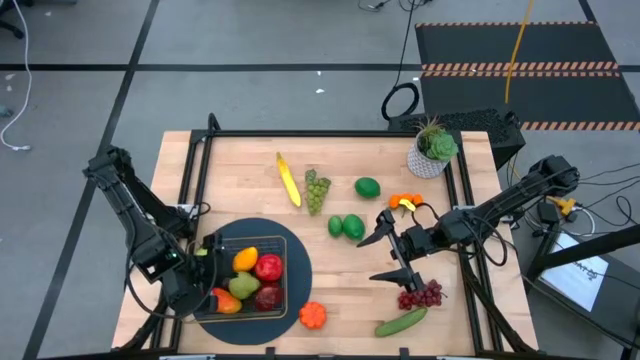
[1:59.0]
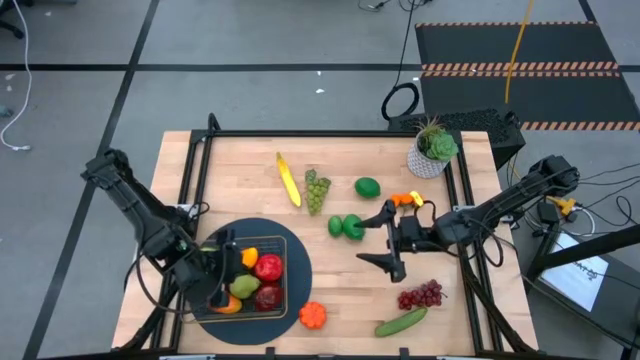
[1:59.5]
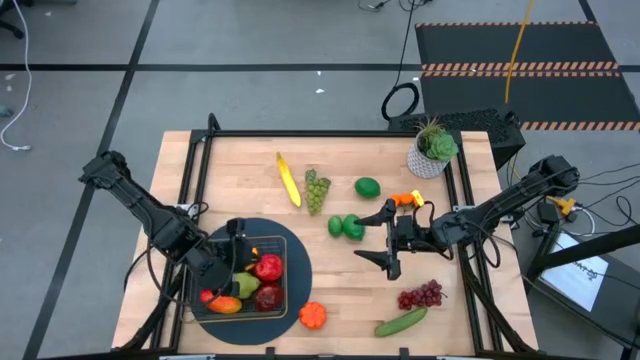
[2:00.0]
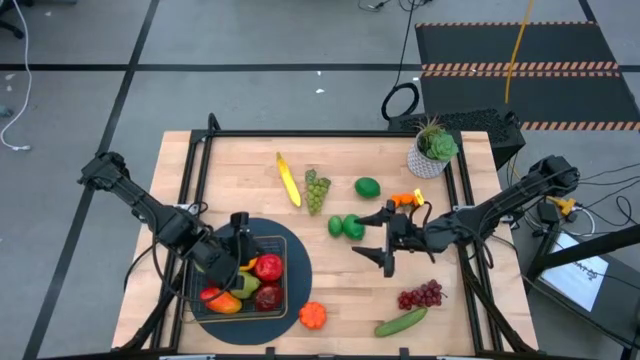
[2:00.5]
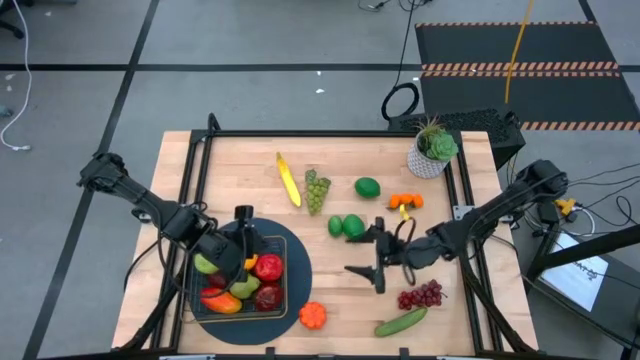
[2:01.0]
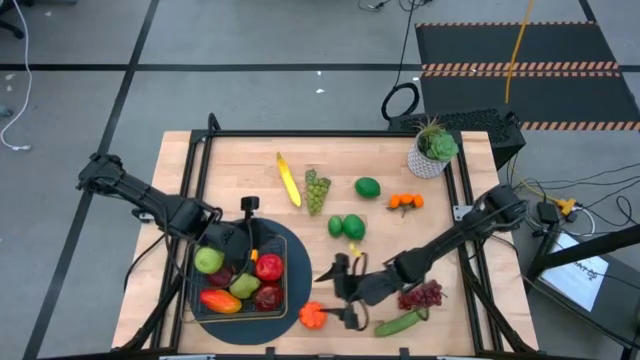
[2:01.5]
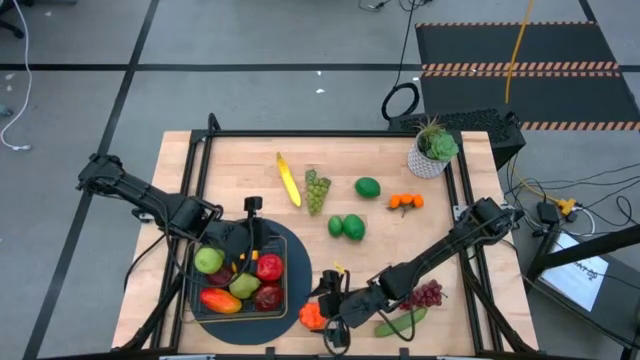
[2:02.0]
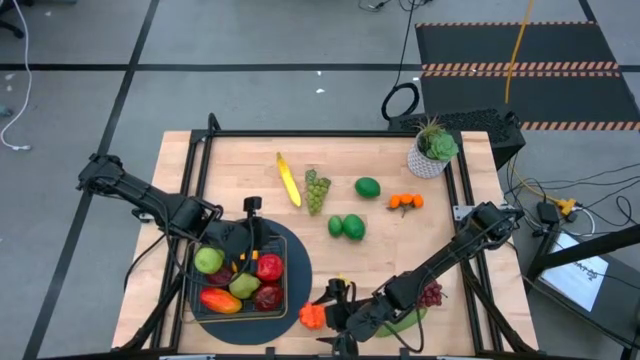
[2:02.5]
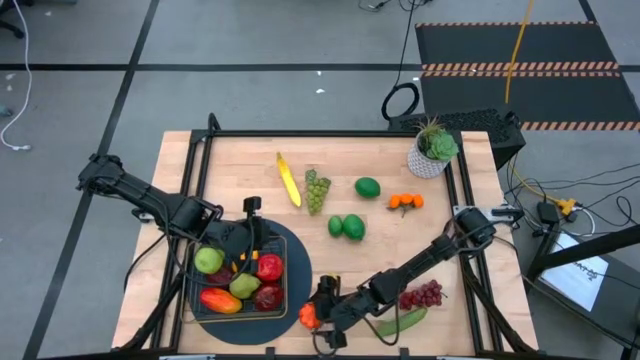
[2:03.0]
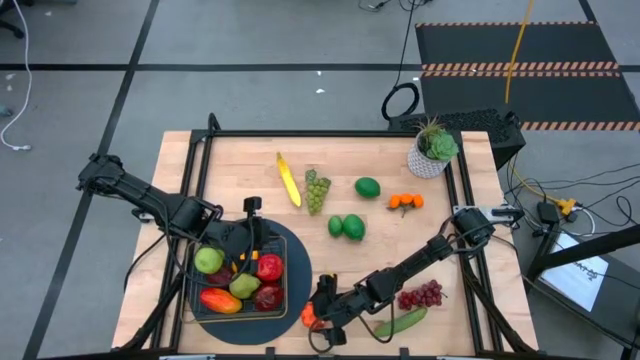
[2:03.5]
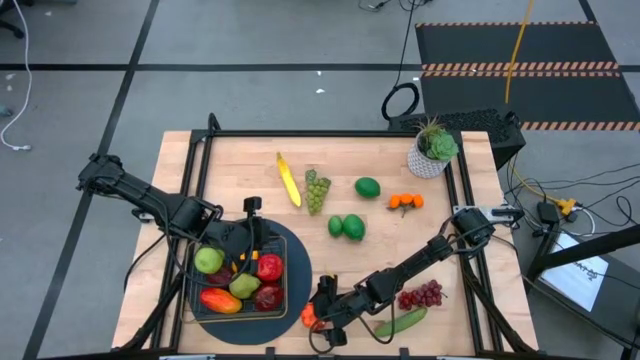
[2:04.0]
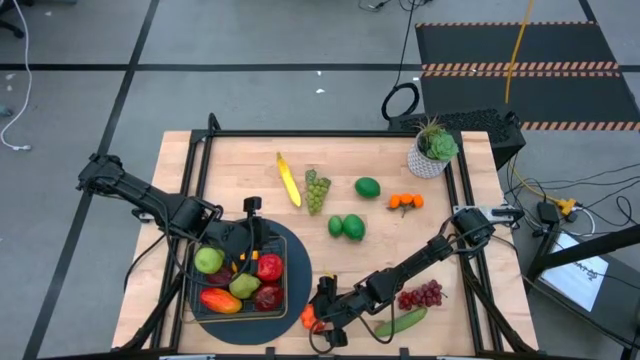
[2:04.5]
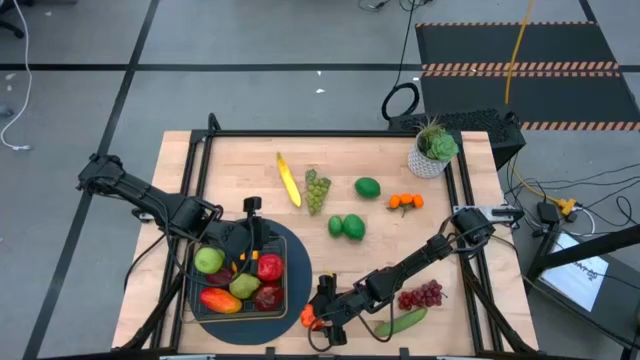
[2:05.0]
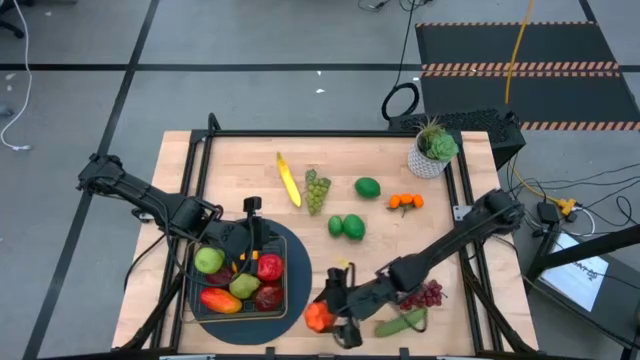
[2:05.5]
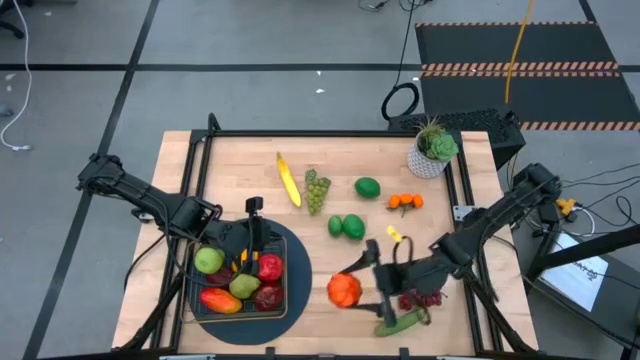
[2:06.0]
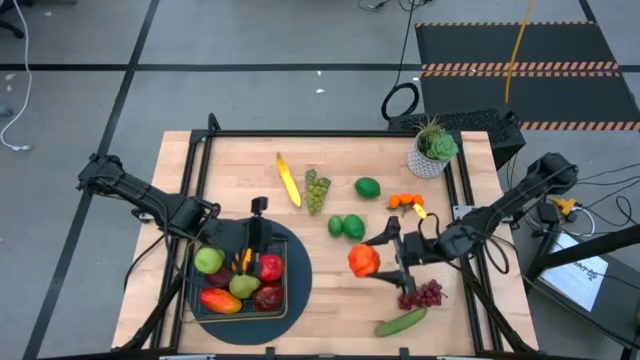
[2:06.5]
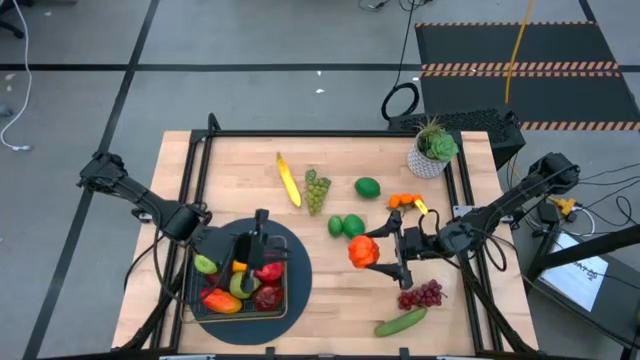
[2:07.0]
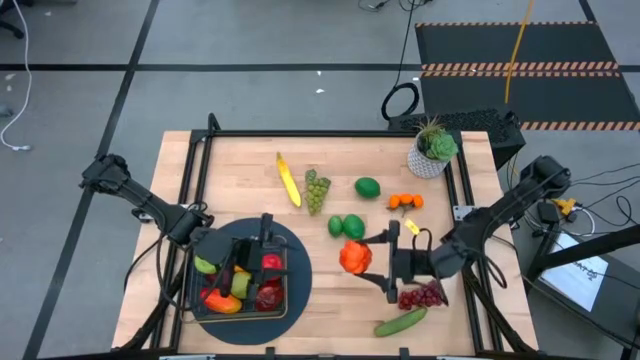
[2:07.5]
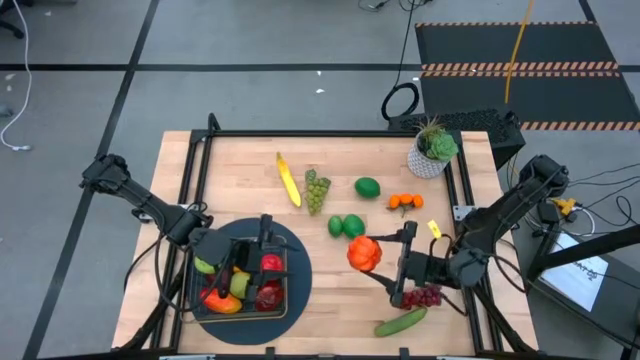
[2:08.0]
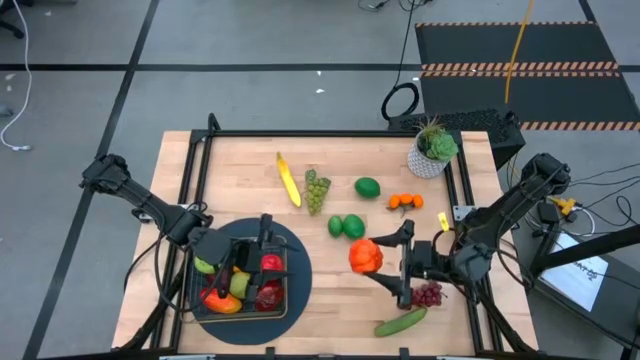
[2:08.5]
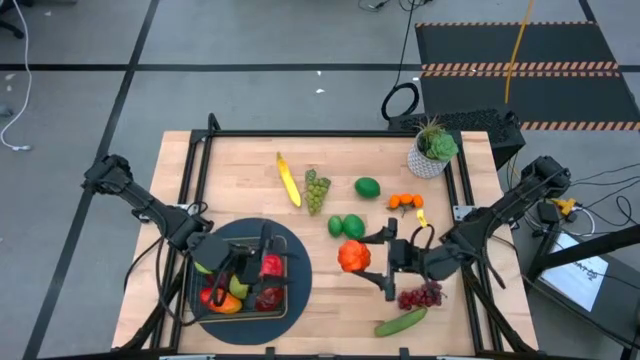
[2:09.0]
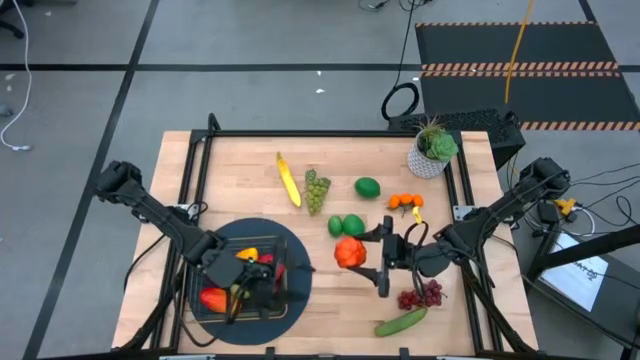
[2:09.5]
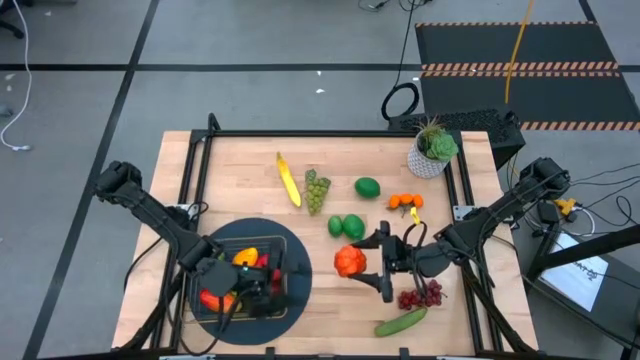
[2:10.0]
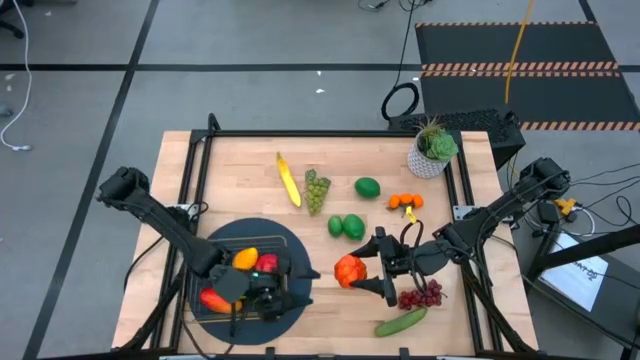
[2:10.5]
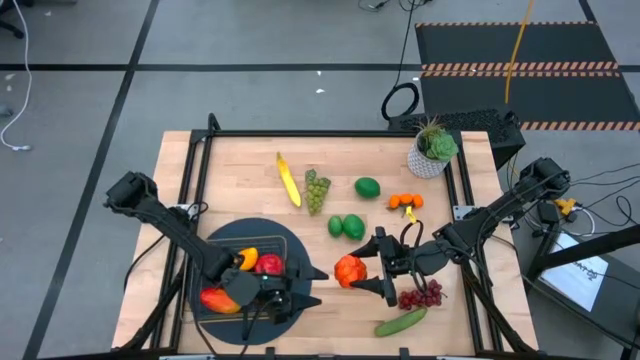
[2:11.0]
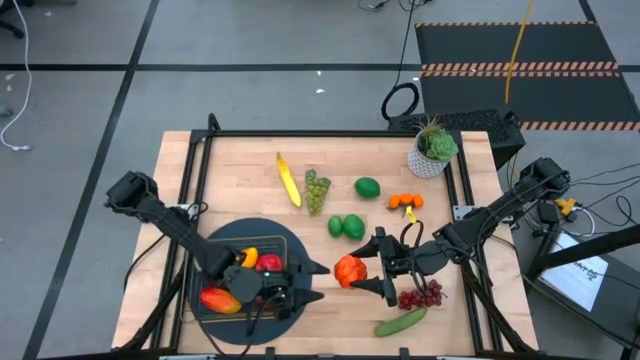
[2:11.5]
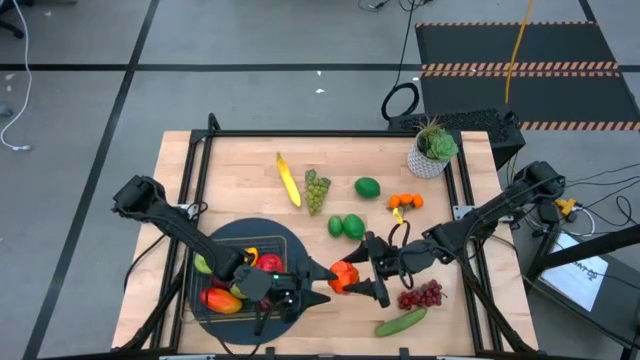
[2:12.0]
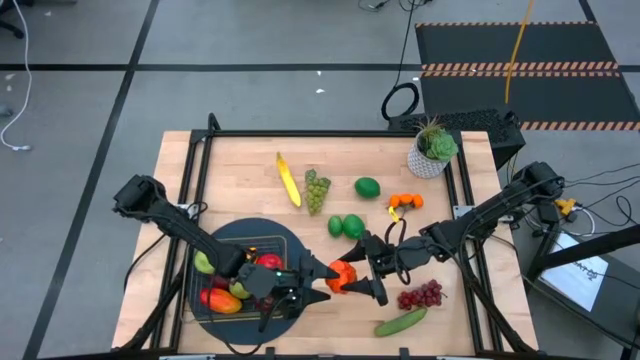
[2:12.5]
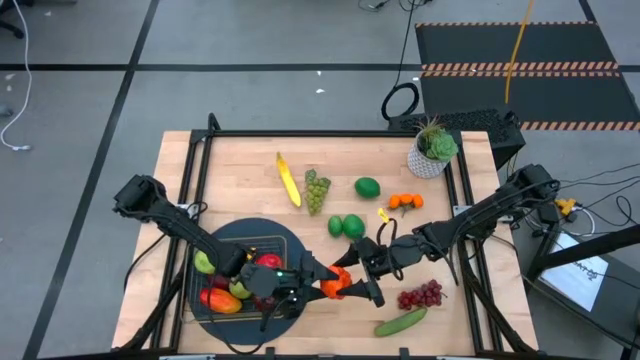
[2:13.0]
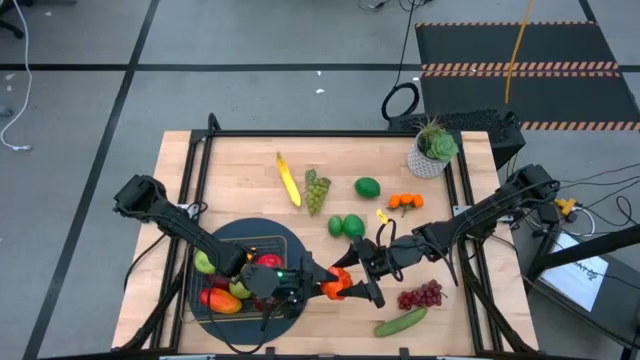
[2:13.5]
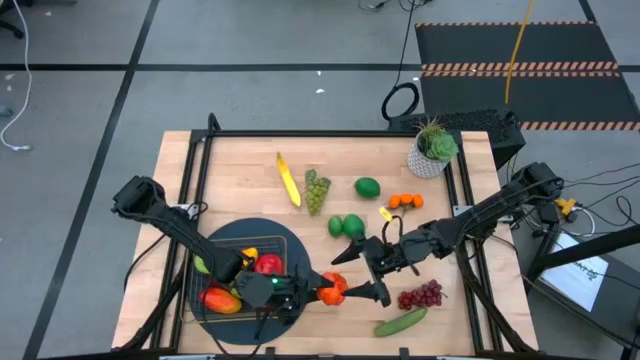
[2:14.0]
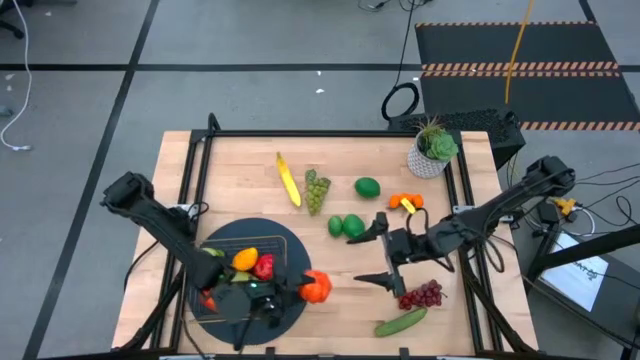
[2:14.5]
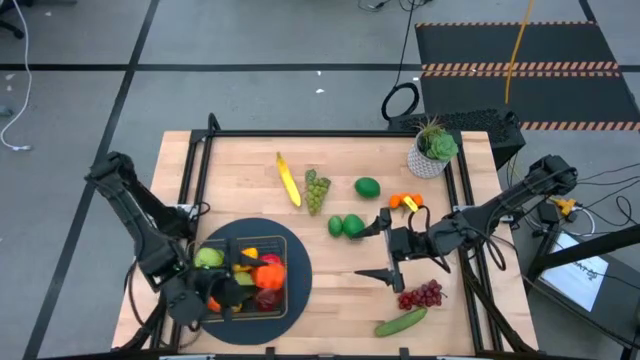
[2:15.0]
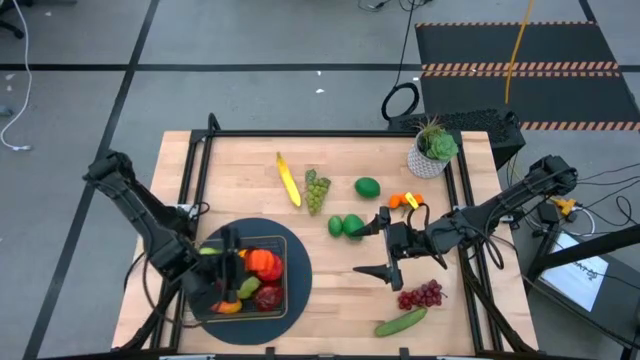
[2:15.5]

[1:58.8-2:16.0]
Task: Build produce basket
Put the tangerine into the gold wire basket

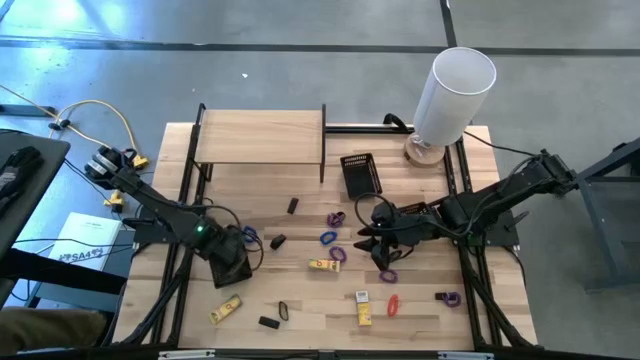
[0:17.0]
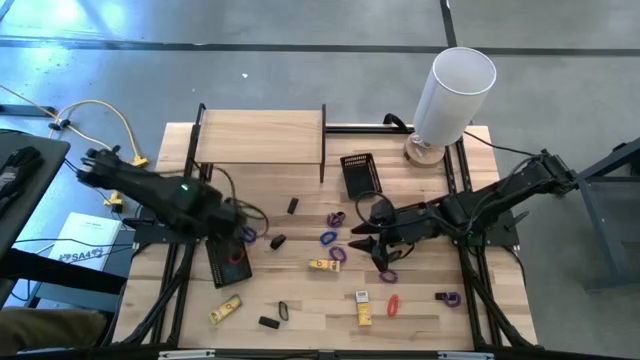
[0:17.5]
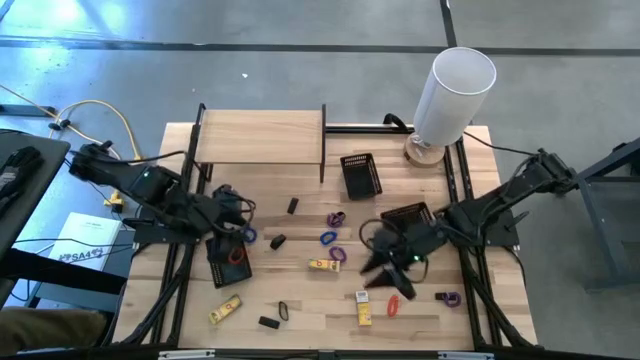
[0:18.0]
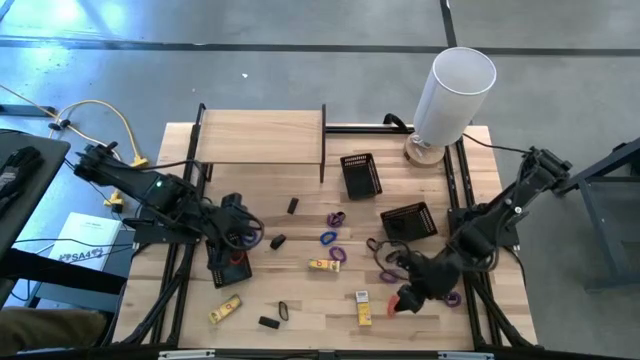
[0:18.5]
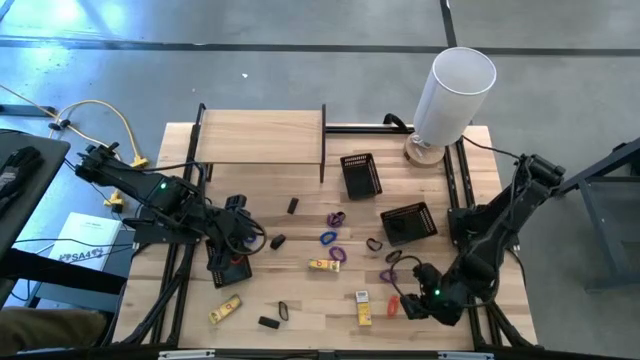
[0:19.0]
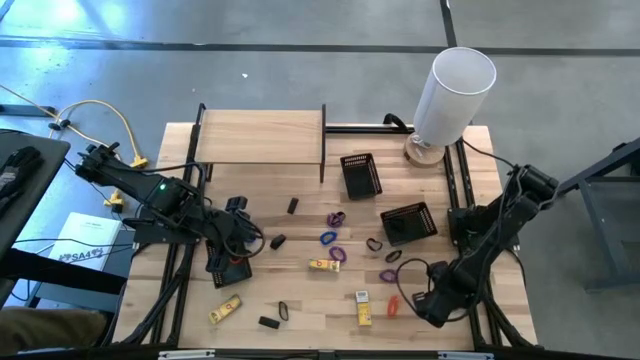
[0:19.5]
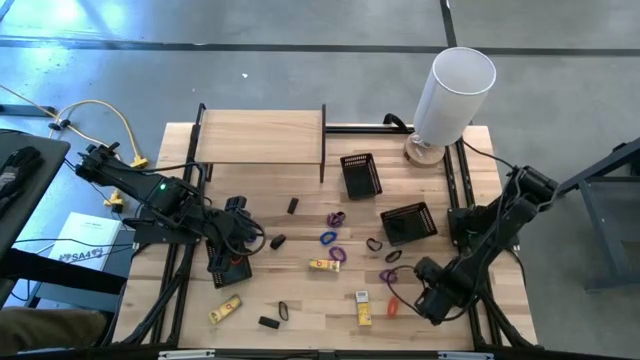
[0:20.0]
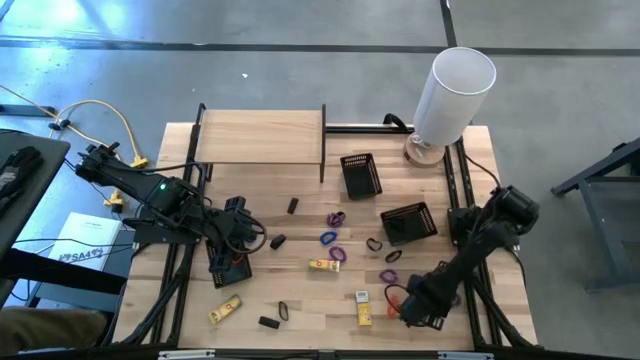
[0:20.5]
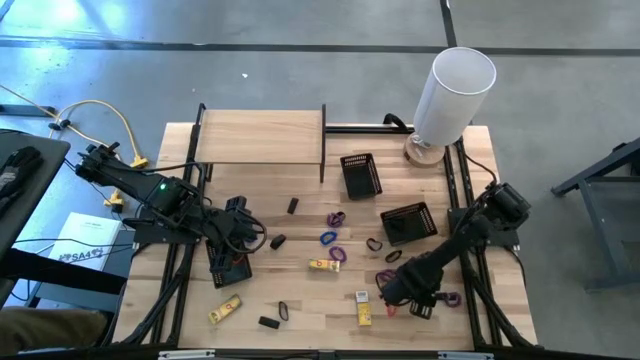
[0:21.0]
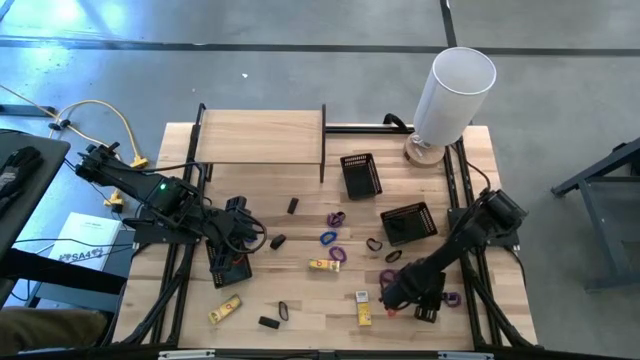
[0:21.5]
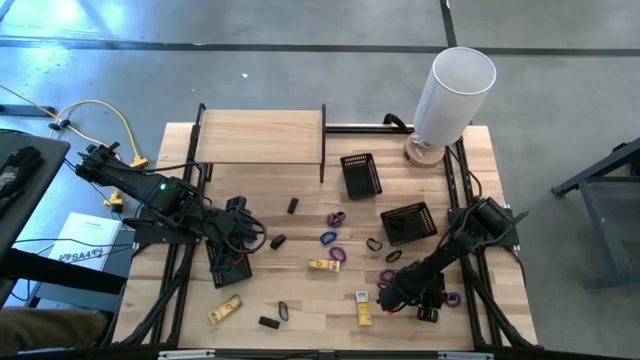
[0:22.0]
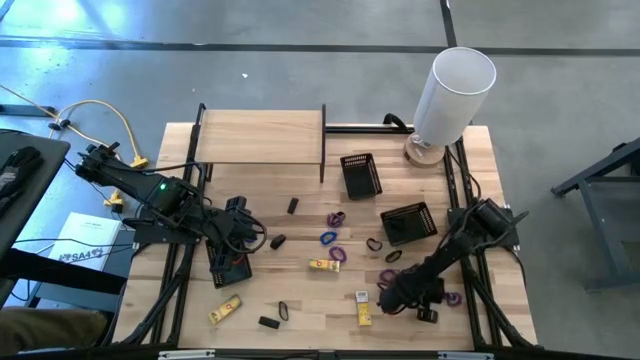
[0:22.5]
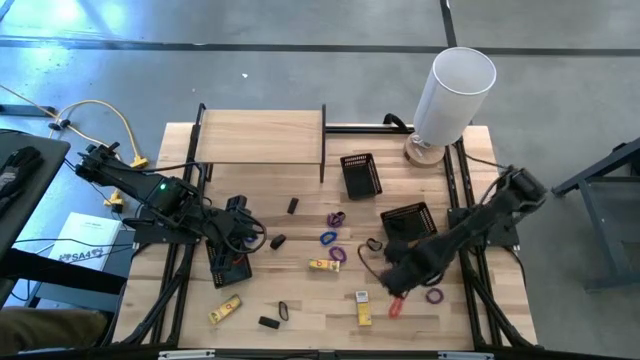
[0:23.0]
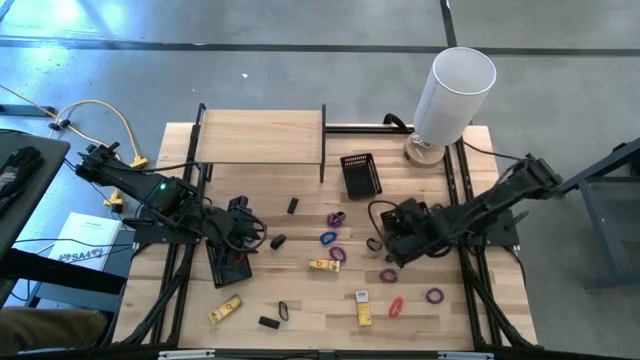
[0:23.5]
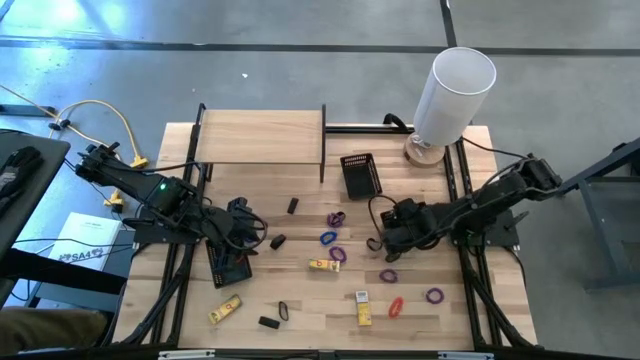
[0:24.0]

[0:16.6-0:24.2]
Task: Pick & Place Office Desk Supplies
Put the black rubberband into the bottom right black bin
